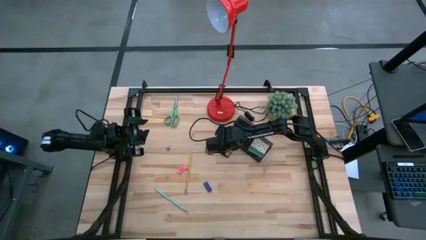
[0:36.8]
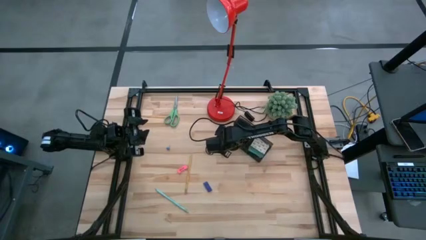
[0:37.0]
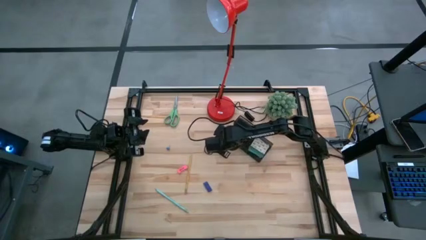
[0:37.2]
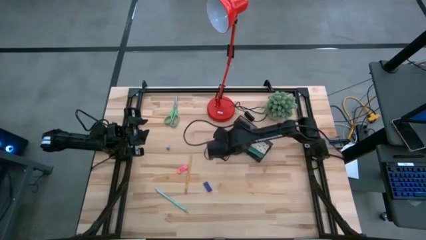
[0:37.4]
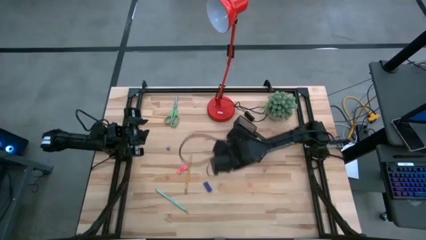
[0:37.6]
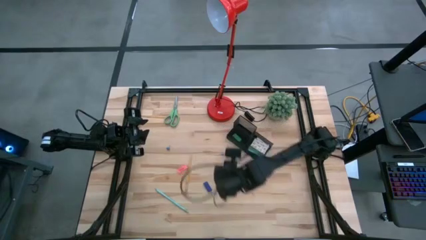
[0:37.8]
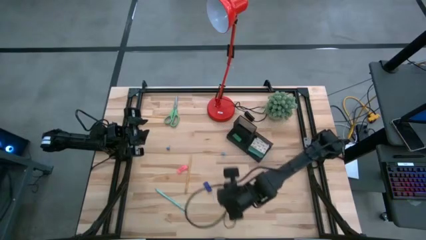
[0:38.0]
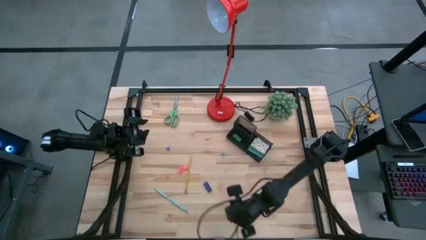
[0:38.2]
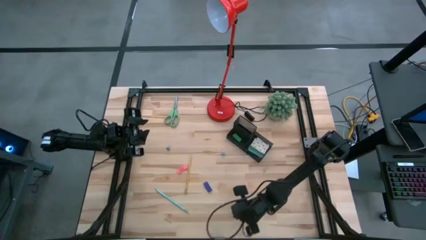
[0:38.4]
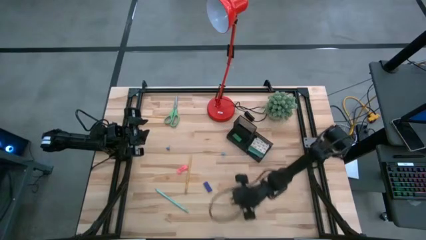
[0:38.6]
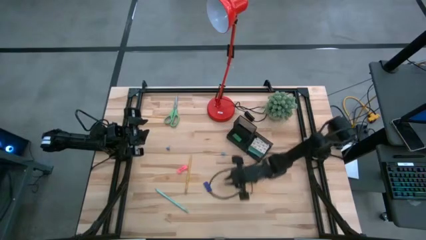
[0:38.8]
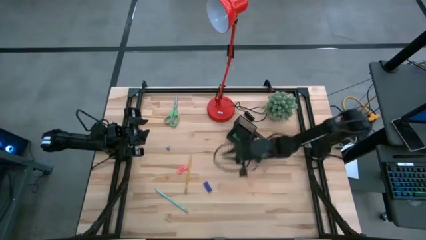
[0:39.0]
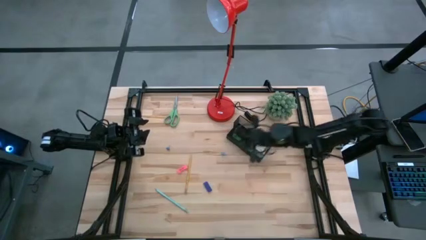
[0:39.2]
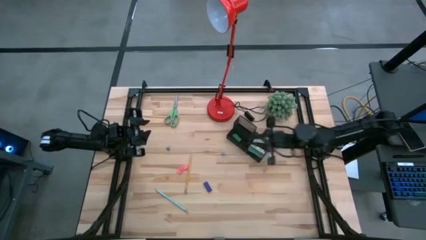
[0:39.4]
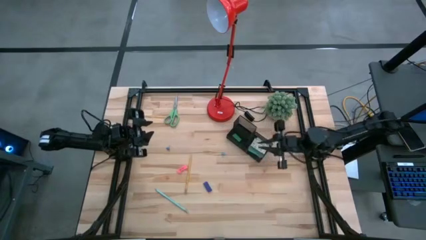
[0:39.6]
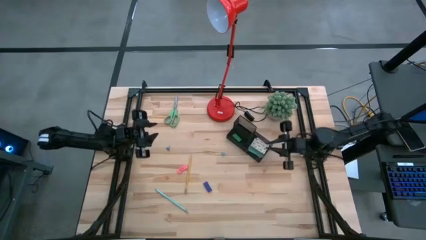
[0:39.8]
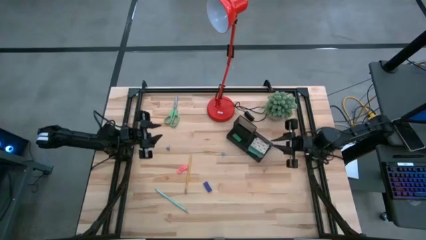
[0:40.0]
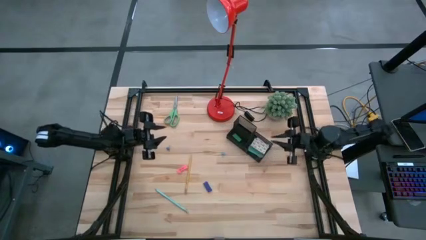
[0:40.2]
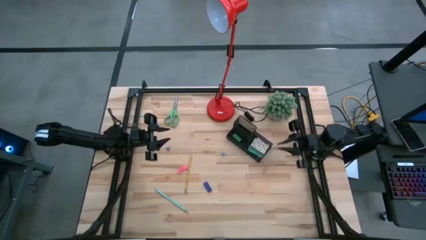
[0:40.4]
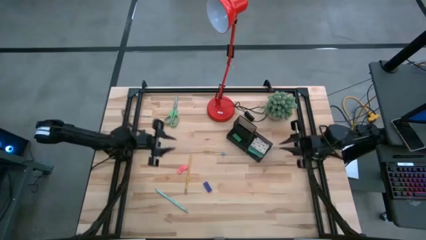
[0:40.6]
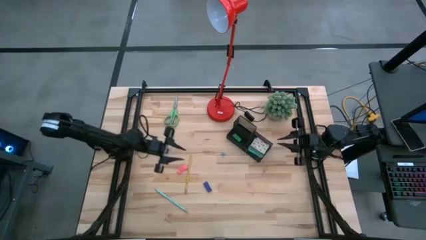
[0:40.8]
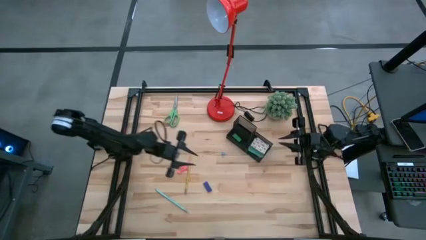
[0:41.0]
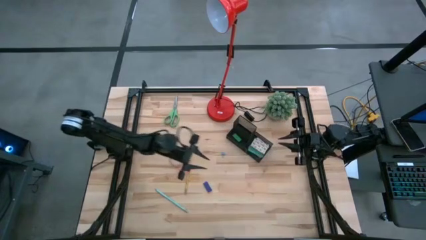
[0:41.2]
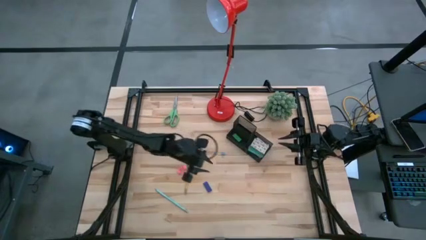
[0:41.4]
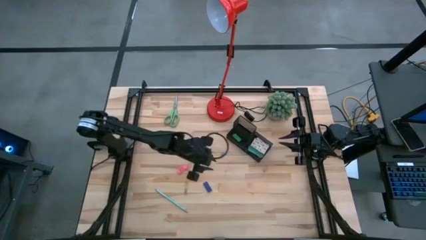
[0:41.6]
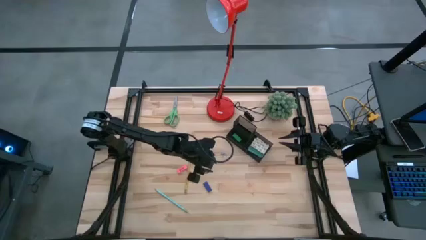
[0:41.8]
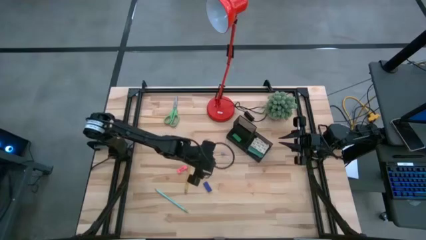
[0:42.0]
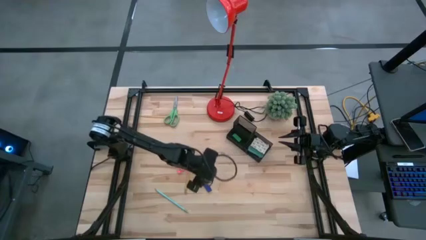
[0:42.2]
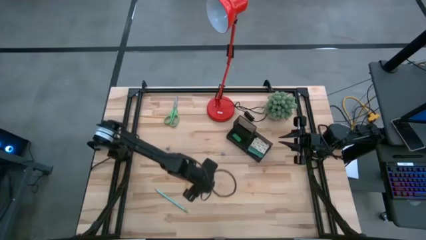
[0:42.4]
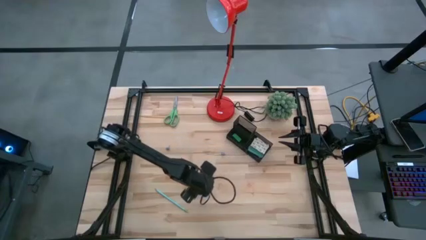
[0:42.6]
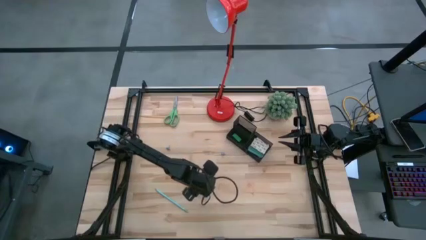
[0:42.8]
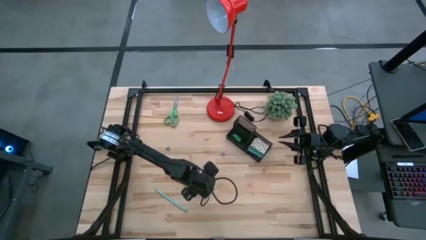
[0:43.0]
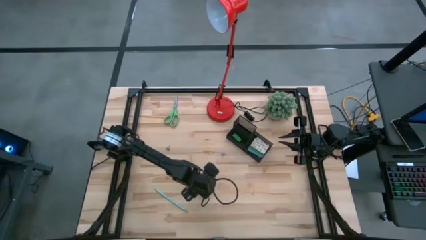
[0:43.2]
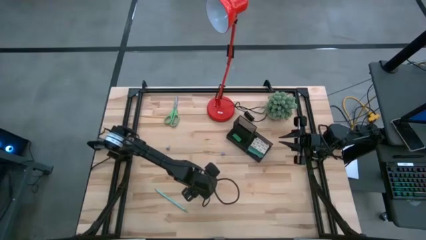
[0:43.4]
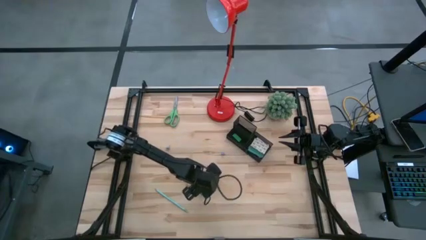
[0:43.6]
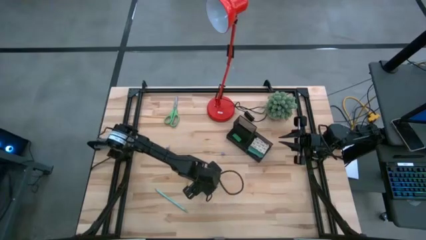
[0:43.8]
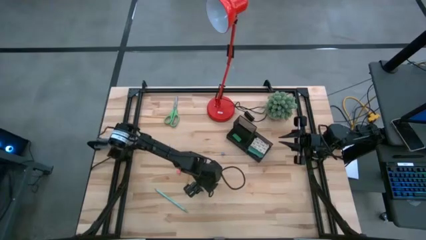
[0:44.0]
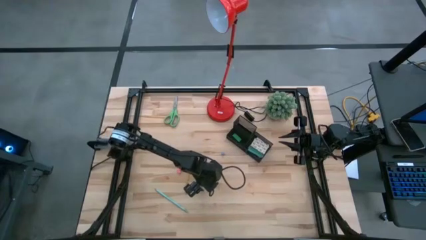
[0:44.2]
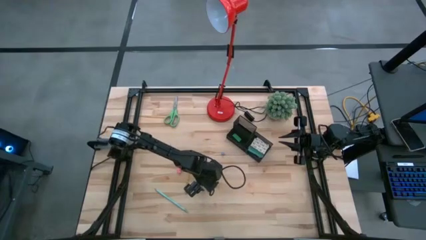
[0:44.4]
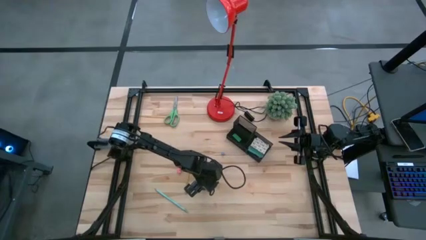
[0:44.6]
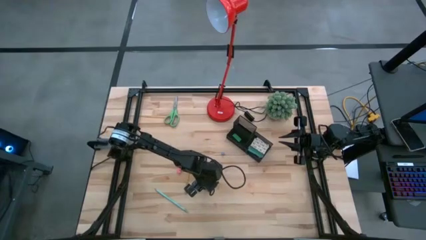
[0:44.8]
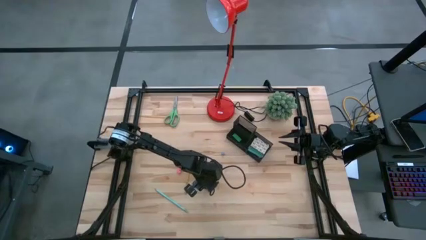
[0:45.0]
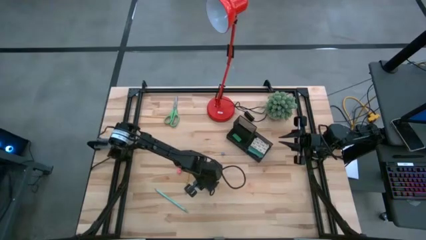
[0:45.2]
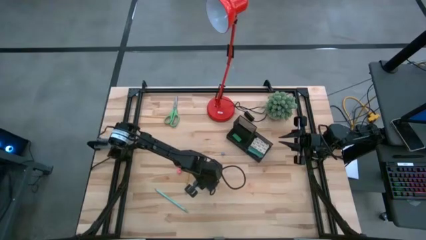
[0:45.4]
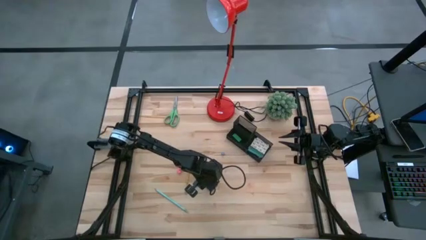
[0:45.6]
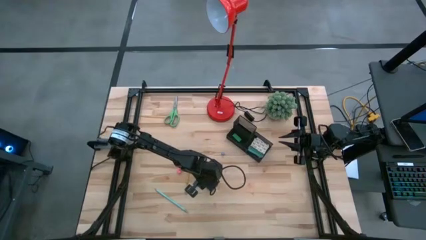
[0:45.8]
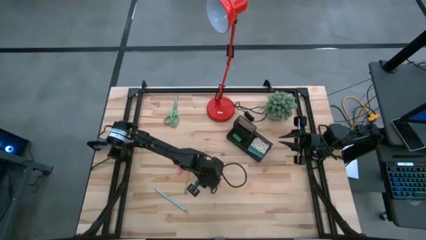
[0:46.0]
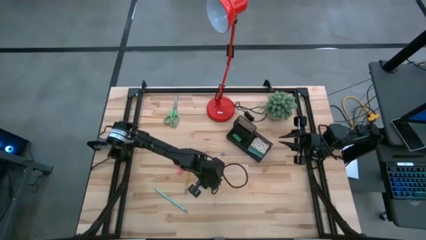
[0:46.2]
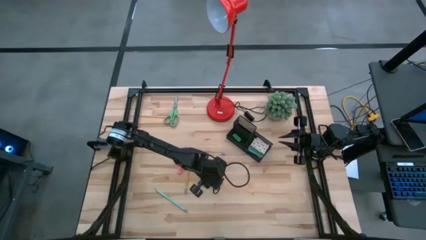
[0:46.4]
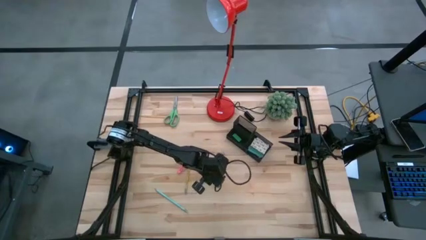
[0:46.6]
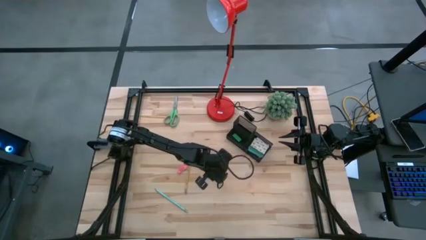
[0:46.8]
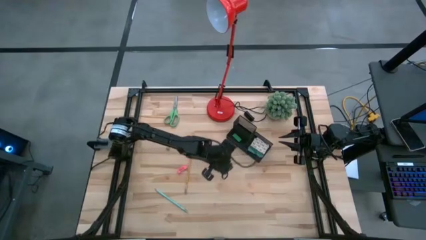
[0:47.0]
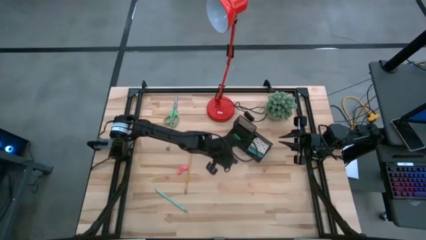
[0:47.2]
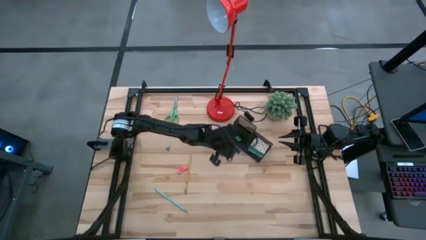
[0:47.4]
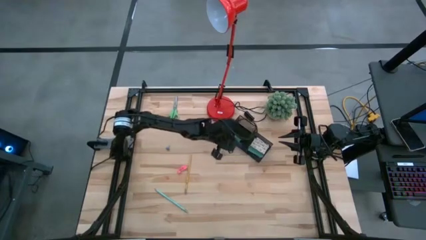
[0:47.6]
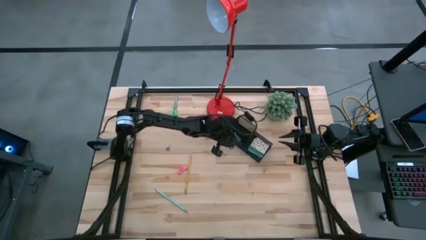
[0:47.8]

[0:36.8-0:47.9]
Task: Pick and place office supplies into organizer
Put the blue eraser into the desk organizer

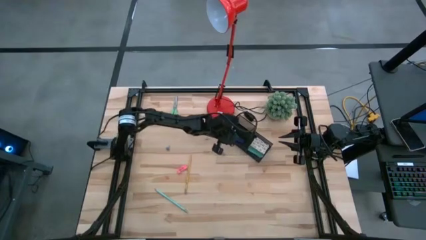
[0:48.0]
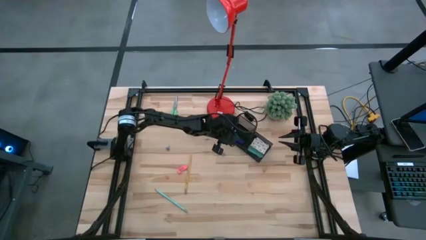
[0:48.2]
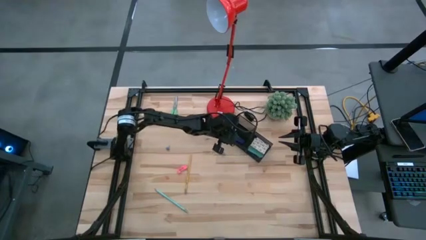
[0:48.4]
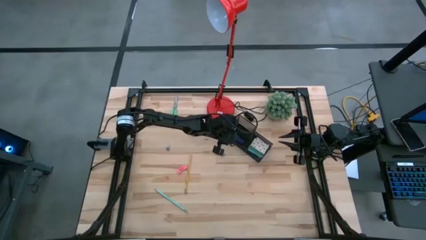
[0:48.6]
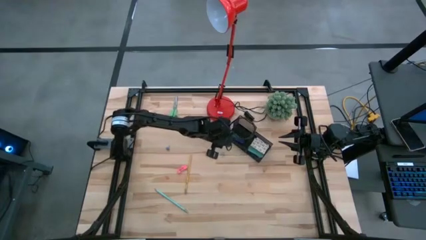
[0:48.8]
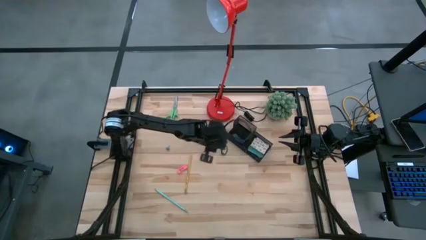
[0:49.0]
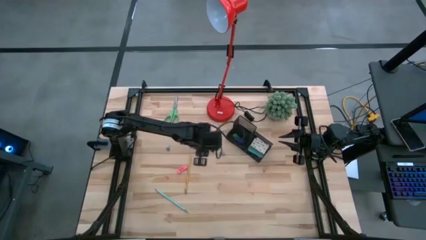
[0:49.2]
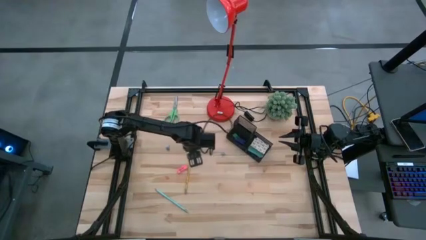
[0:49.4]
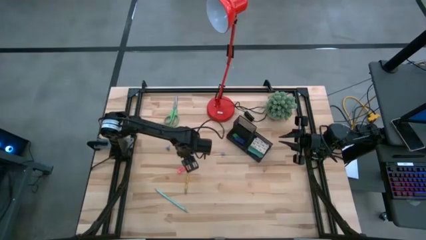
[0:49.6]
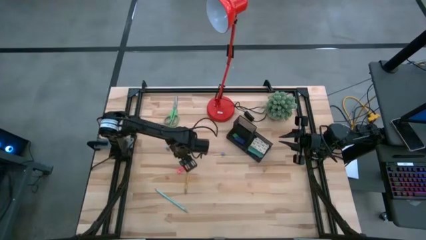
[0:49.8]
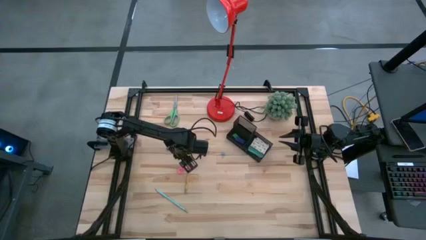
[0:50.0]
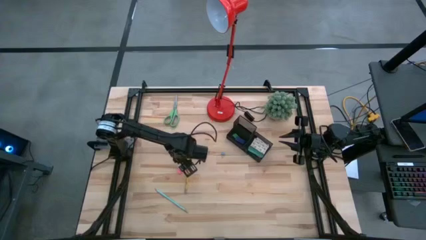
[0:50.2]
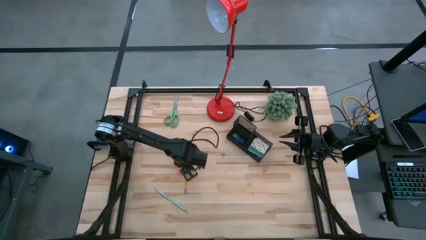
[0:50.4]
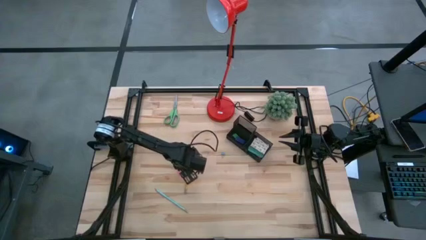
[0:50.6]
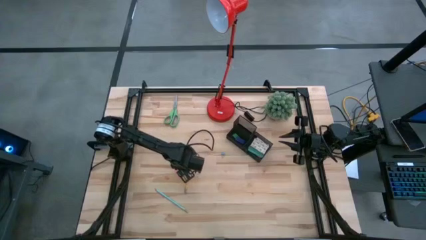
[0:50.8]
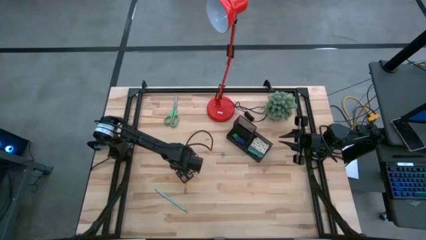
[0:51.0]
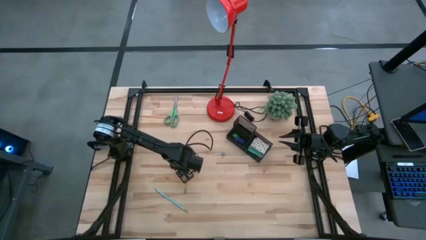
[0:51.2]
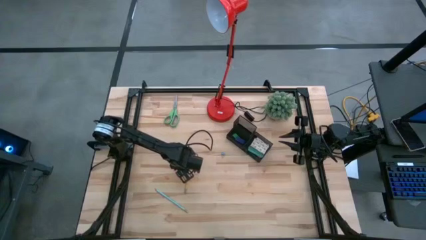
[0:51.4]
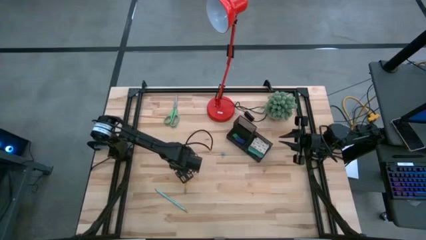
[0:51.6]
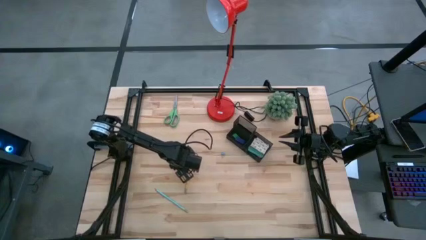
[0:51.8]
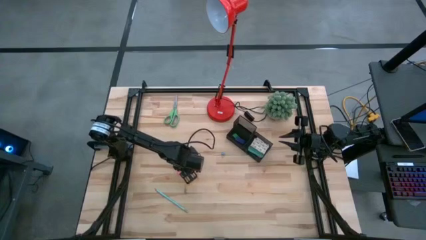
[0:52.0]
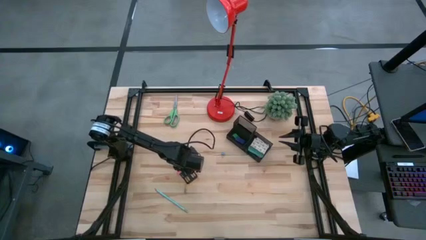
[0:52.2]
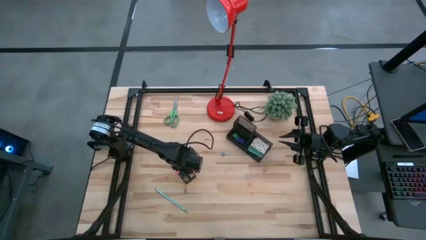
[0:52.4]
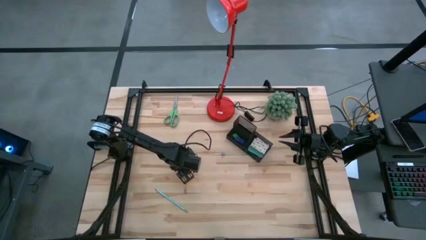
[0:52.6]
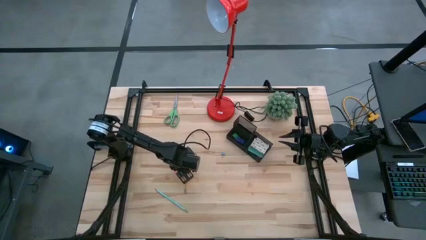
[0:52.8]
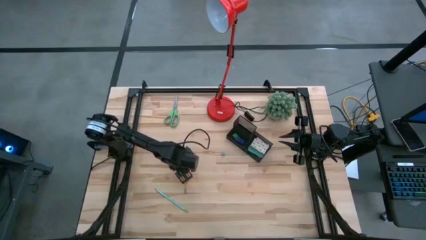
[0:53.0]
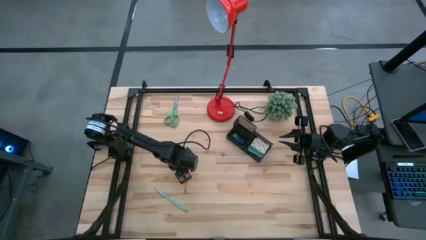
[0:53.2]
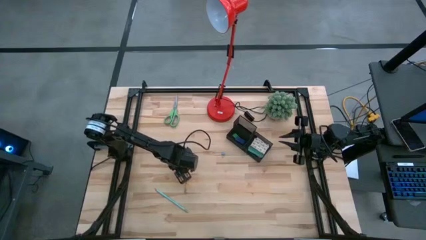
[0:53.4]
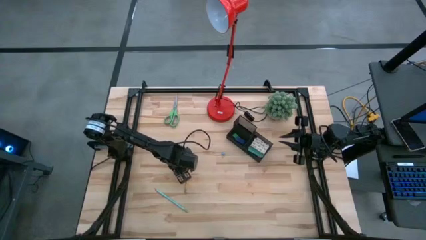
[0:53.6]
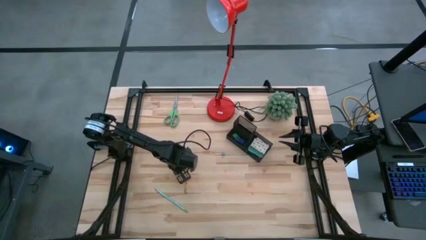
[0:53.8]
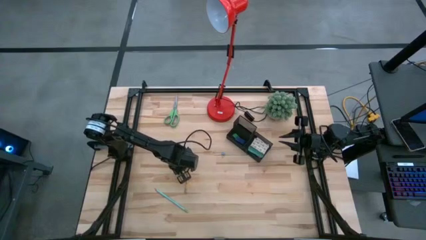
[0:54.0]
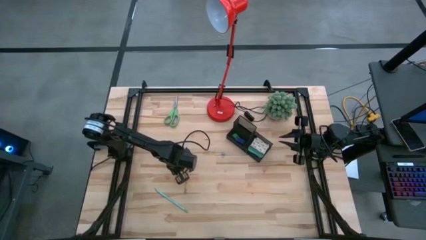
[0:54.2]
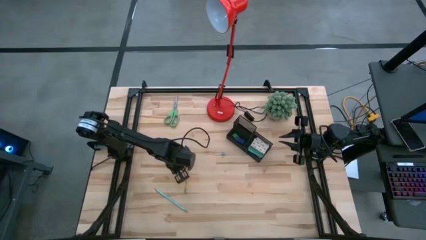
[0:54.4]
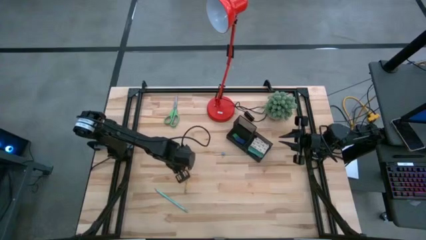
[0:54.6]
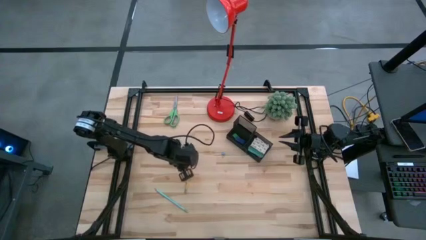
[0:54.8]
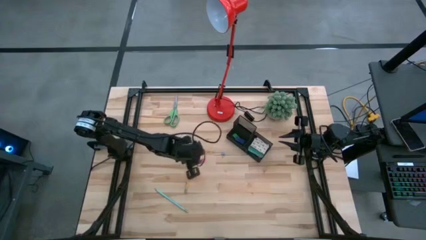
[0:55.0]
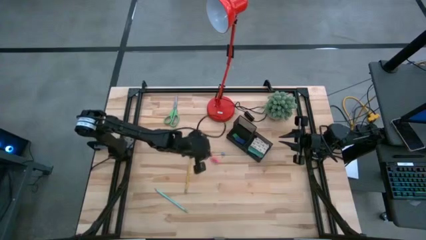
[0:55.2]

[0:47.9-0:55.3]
Put the pink eraser into the desk organizer
